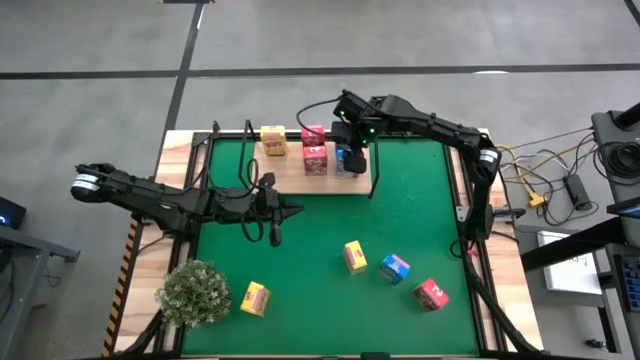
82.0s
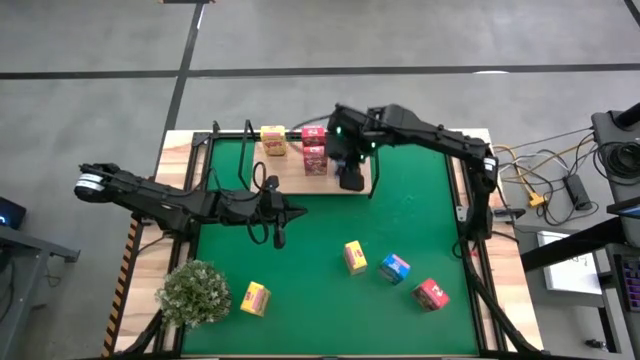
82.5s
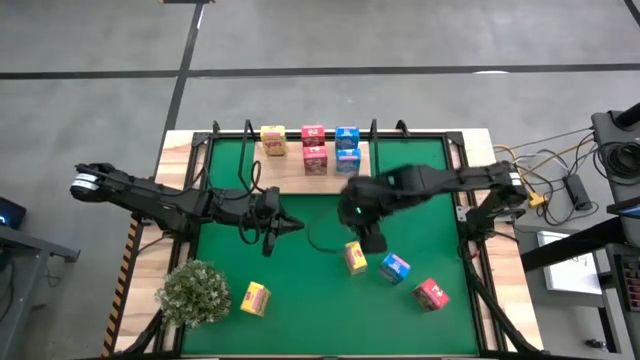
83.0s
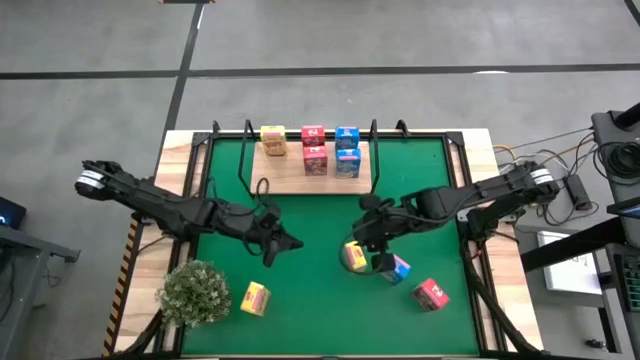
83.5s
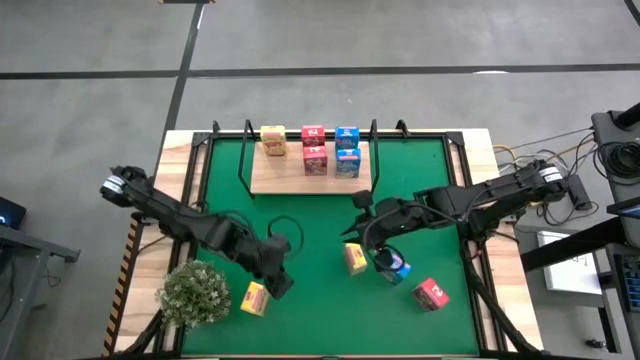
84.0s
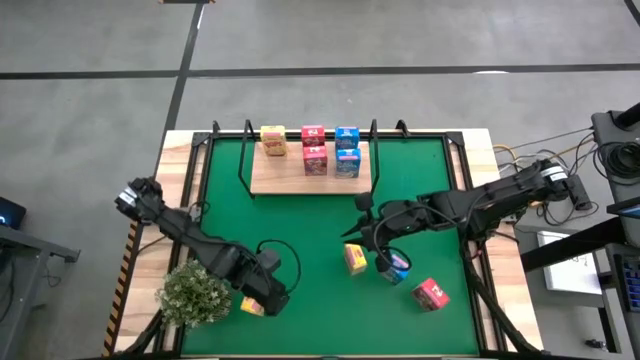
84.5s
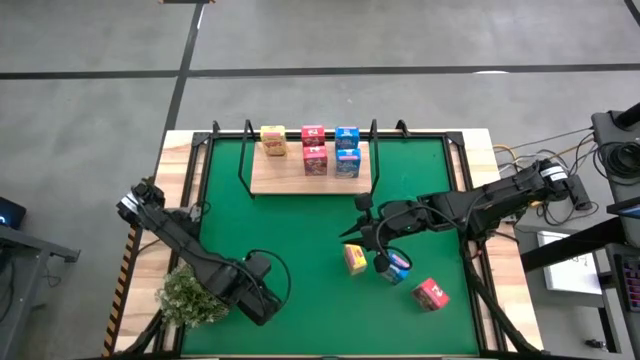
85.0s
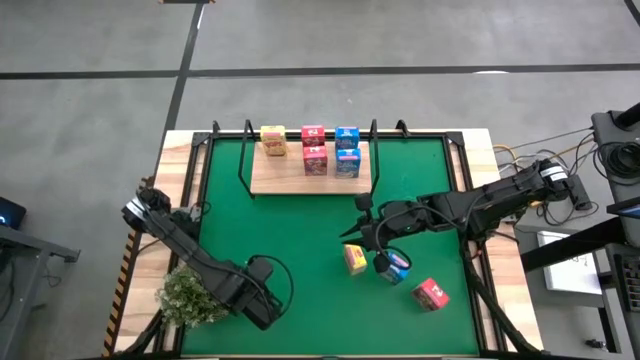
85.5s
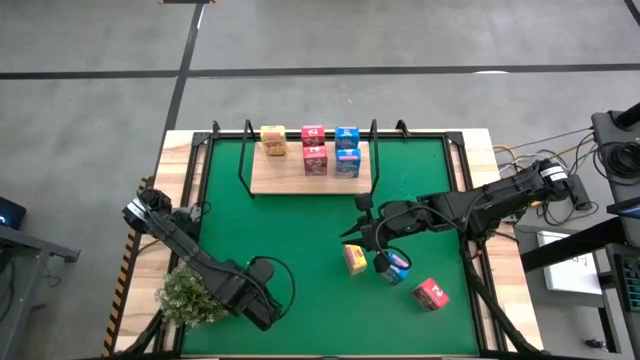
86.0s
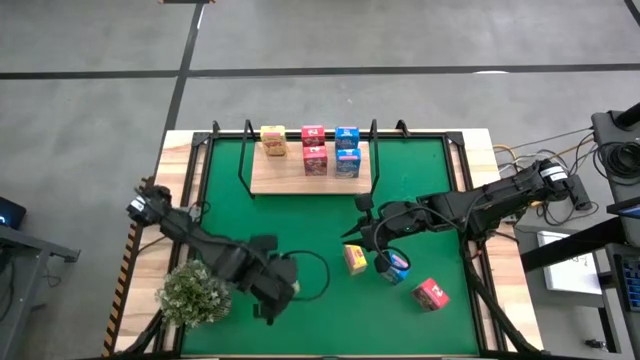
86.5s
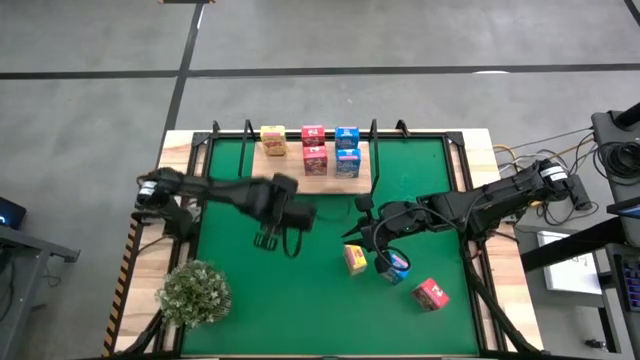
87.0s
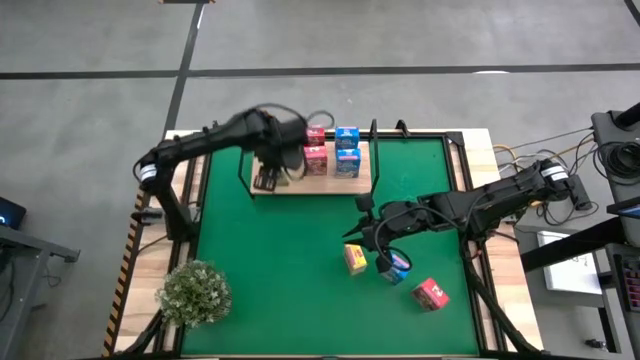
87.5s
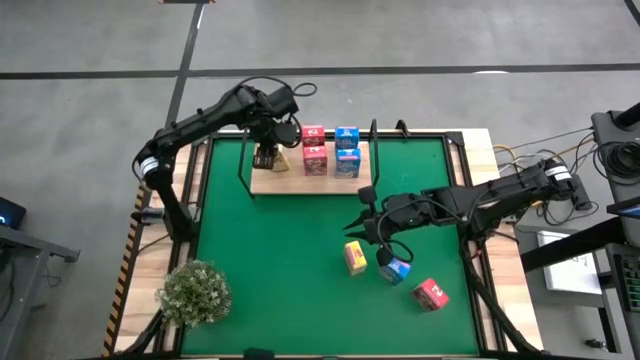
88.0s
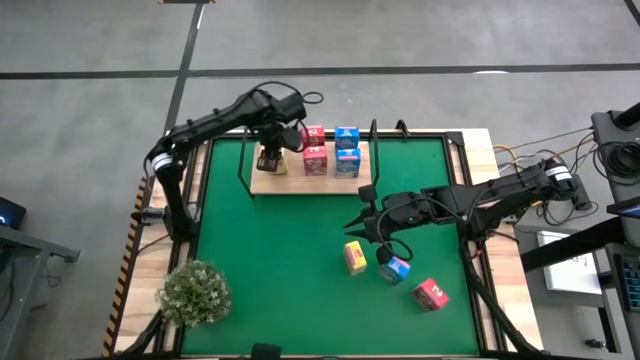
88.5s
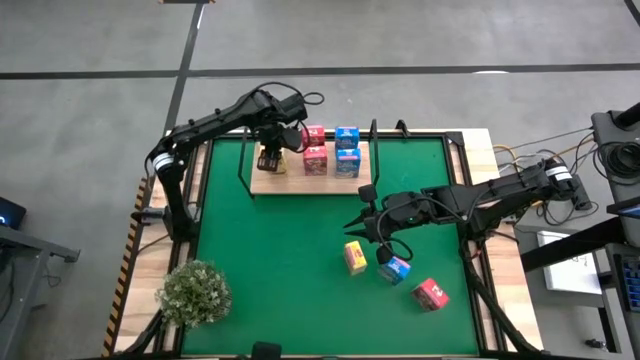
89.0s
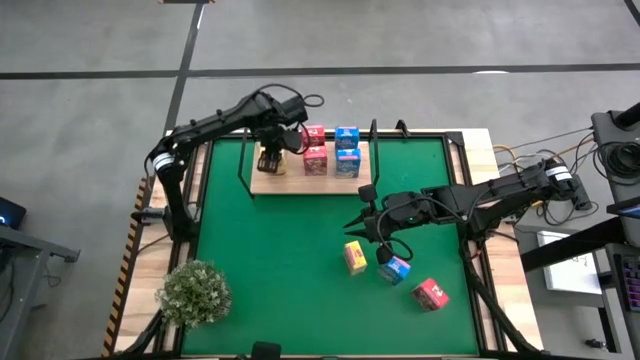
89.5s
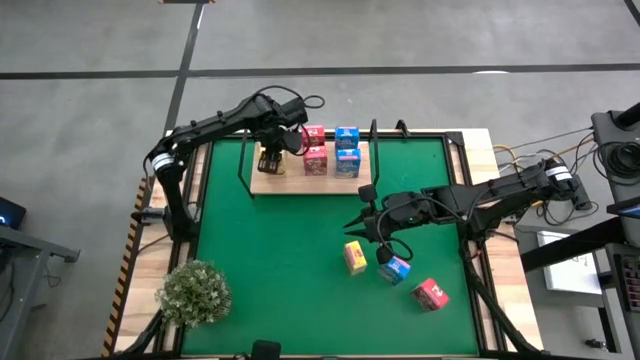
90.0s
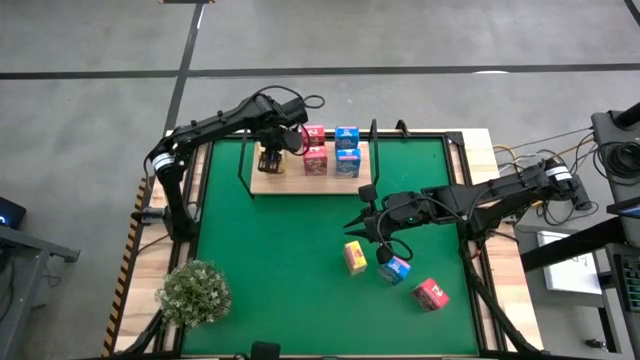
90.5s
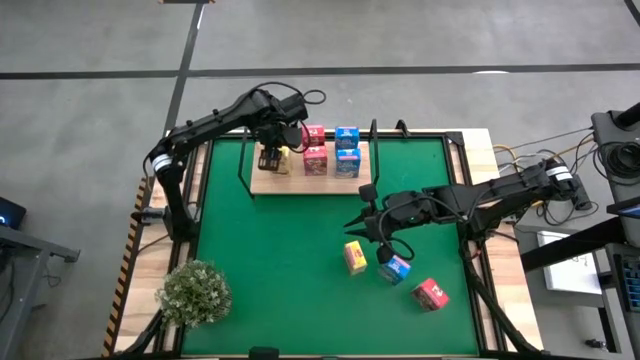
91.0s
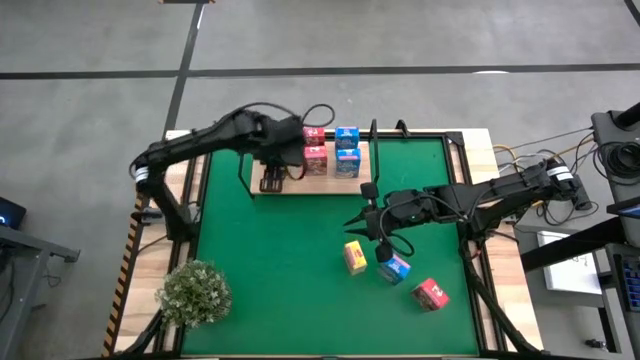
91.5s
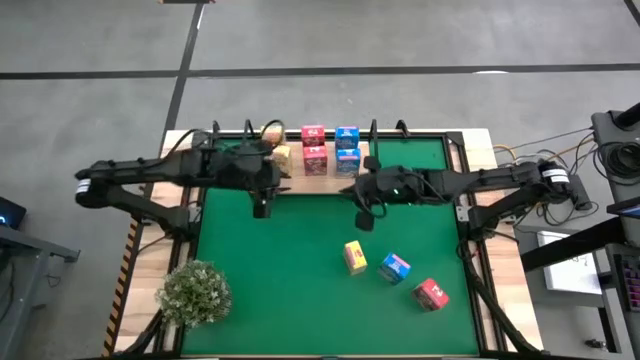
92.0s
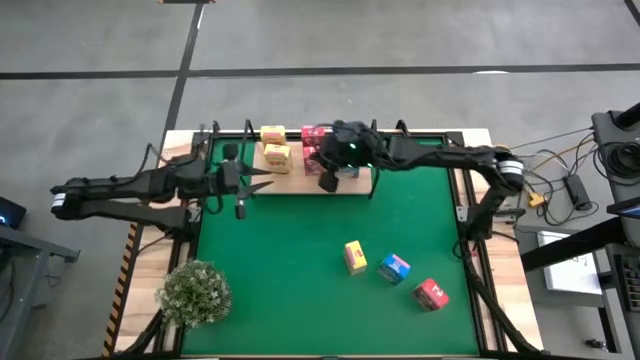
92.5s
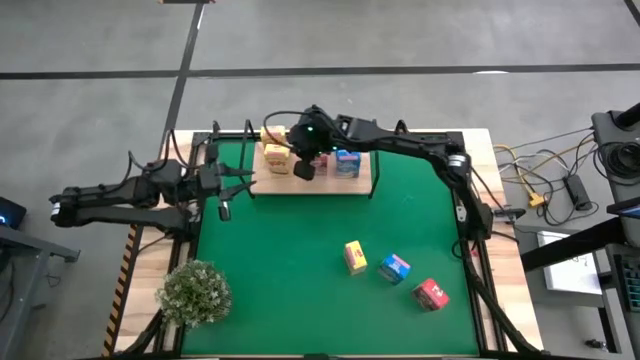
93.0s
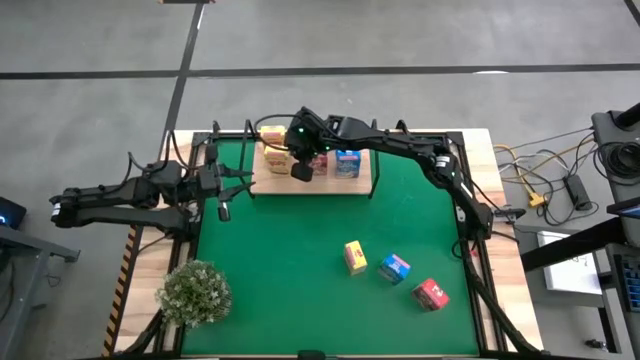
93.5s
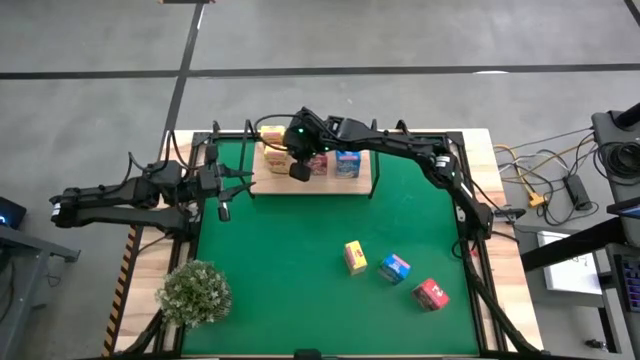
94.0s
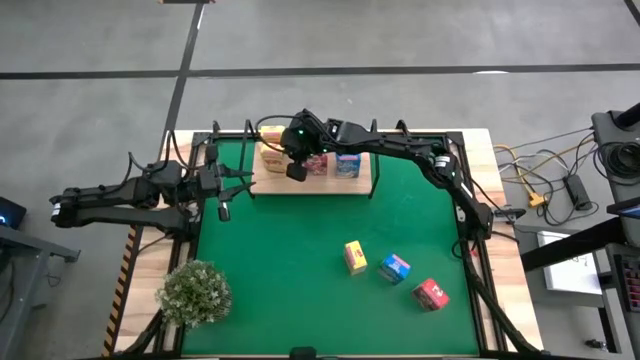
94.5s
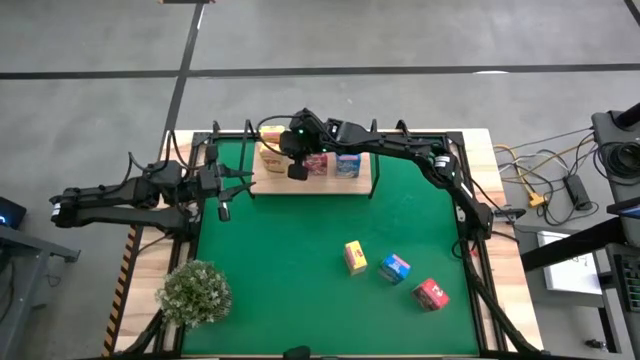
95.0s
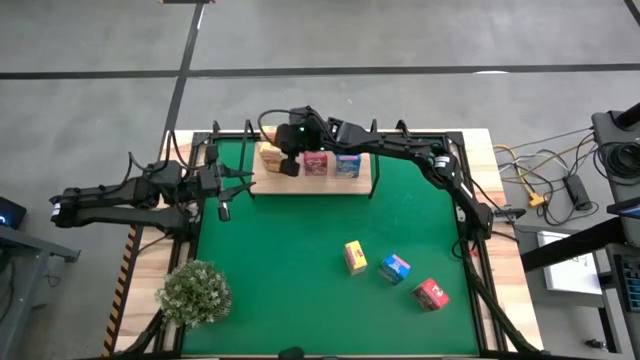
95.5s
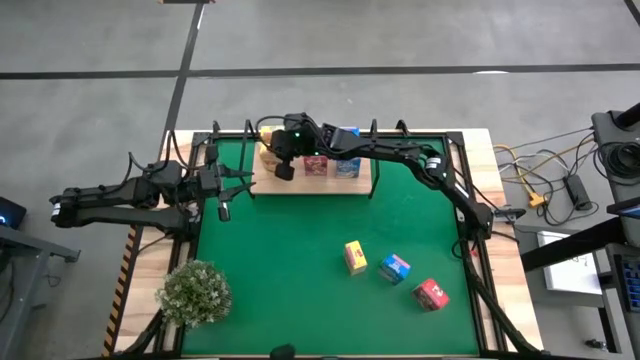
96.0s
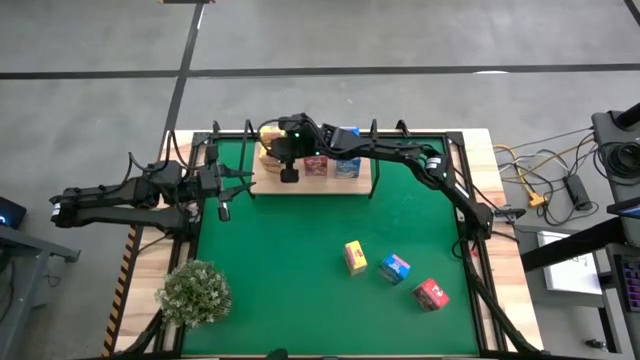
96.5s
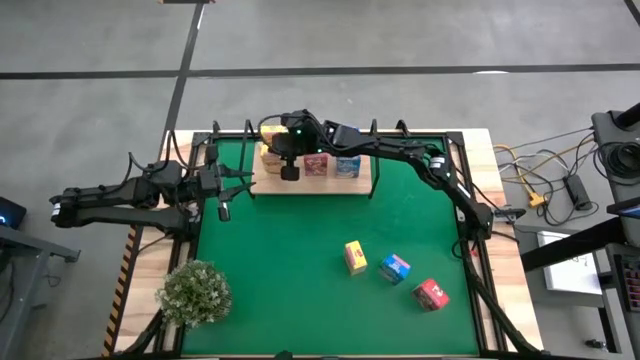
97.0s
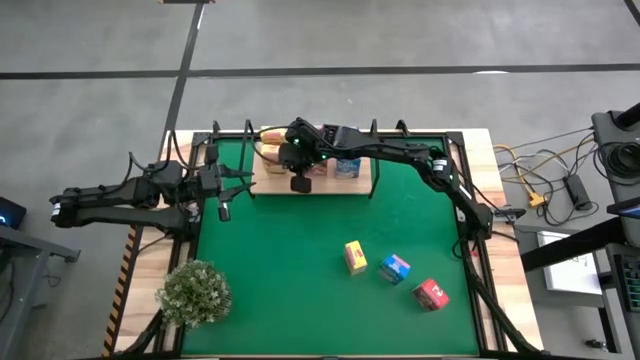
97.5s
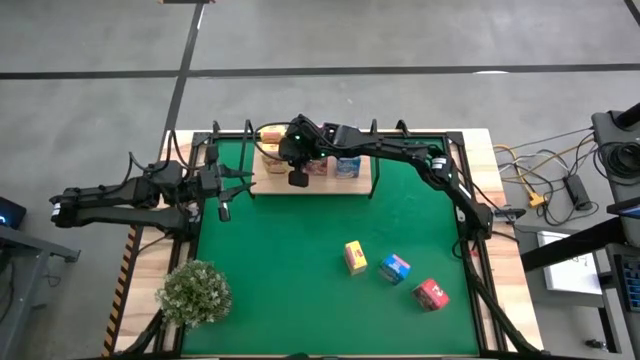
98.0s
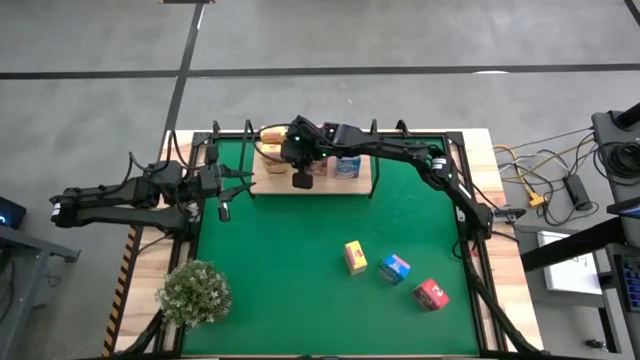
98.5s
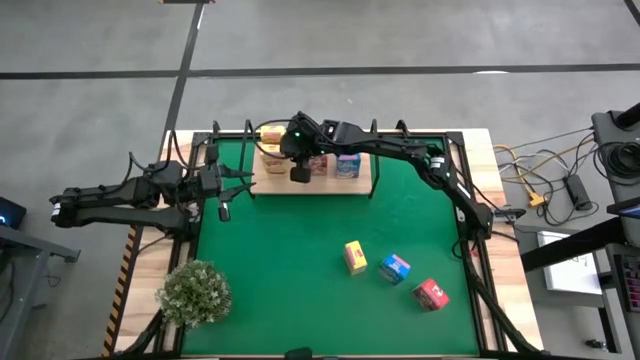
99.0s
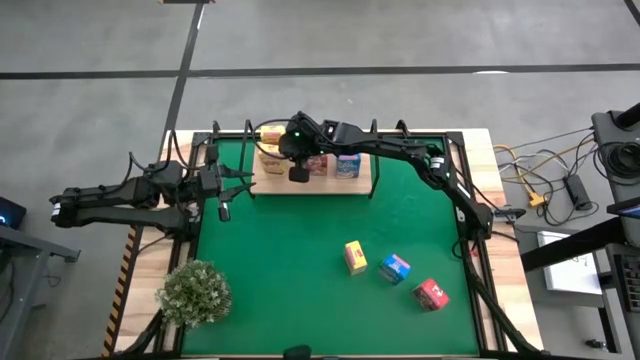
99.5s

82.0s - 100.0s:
Task: Stack cereal on shelf
Put the bottom yellow cereal box on the shelf aligned with the other yellow cereal box

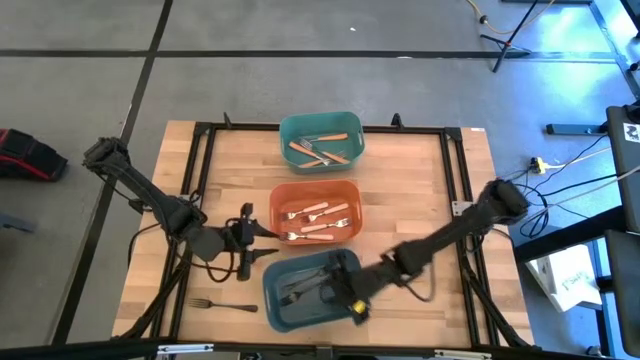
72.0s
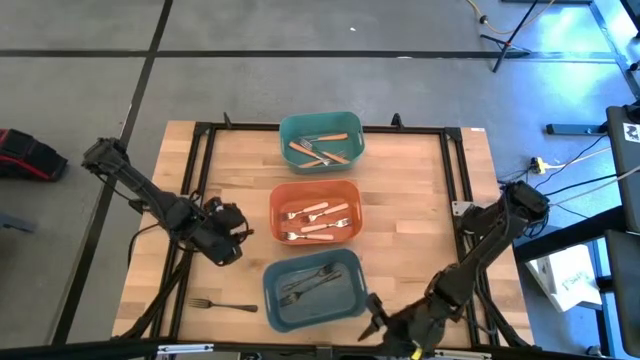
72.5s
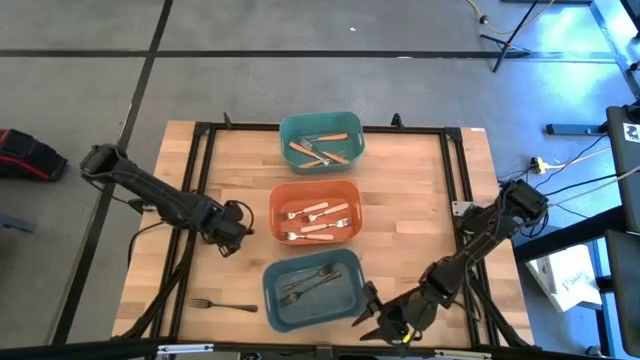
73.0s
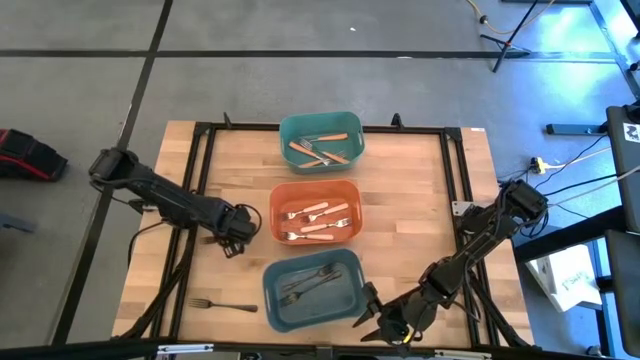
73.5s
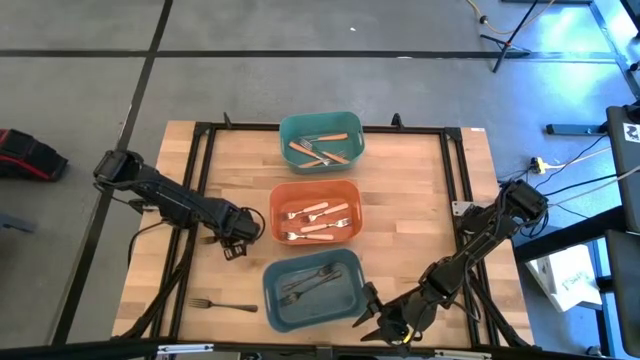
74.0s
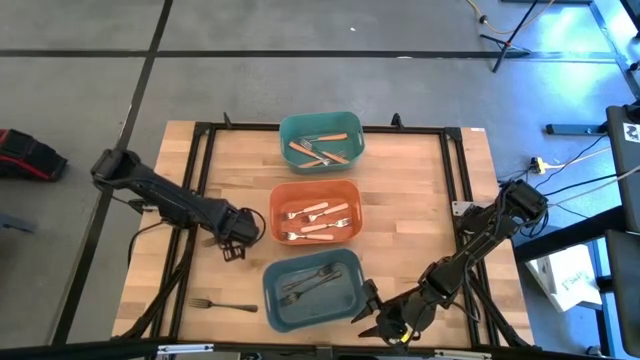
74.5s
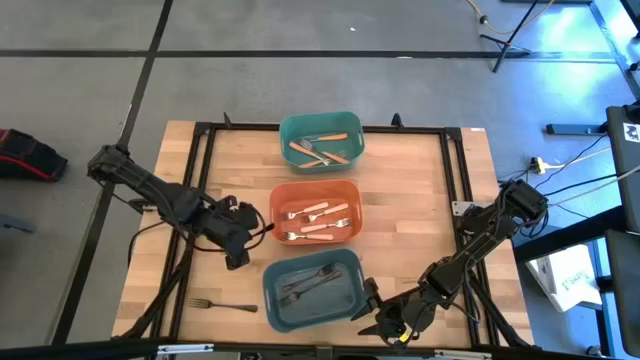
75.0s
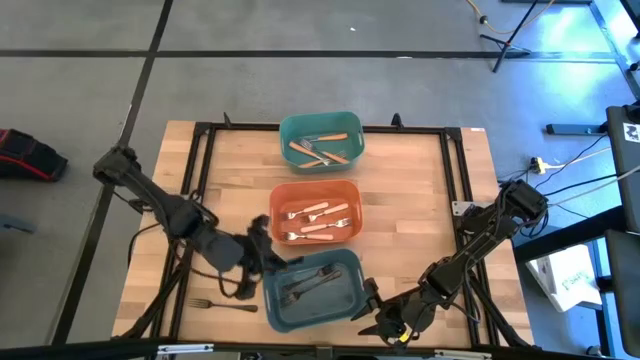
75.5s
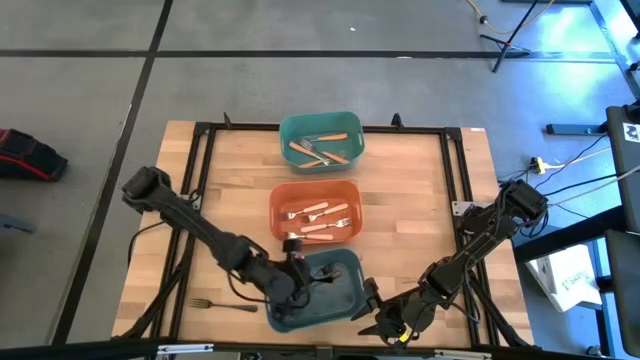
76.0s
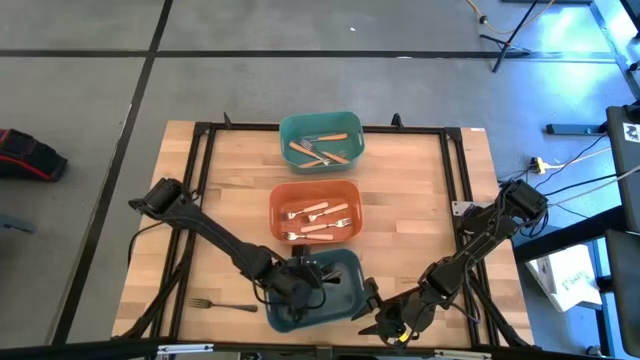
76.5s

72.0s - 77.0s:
Task: Sort silverware by color (type)
Put the black fork into the blue bin
